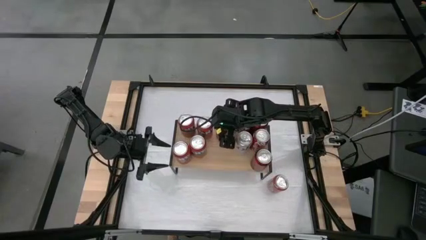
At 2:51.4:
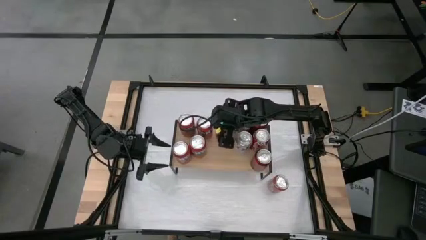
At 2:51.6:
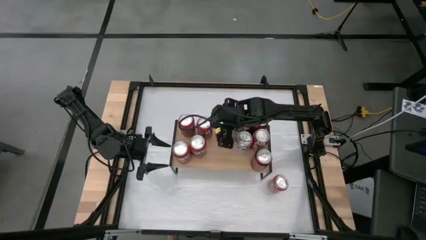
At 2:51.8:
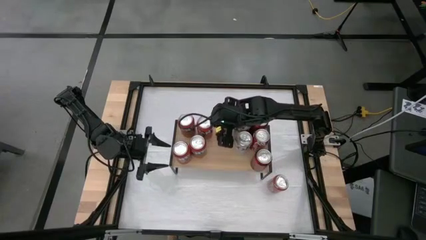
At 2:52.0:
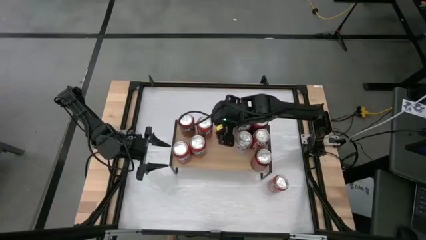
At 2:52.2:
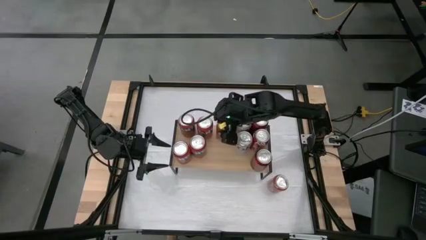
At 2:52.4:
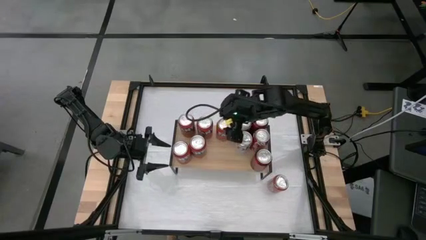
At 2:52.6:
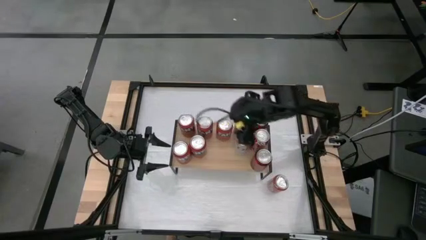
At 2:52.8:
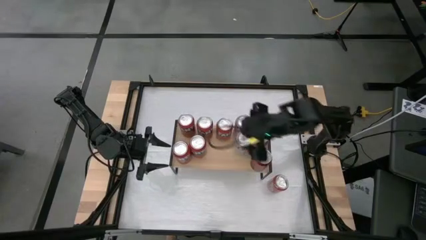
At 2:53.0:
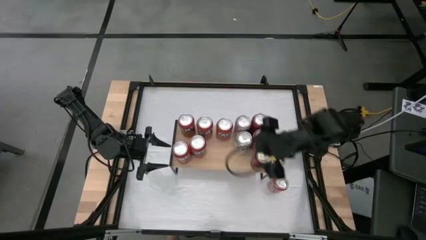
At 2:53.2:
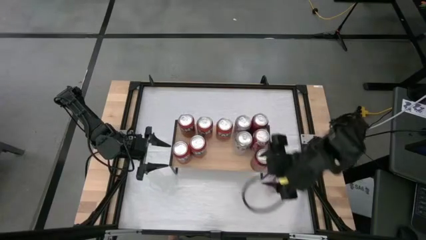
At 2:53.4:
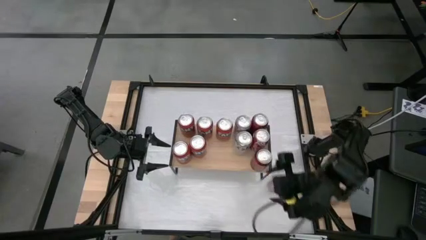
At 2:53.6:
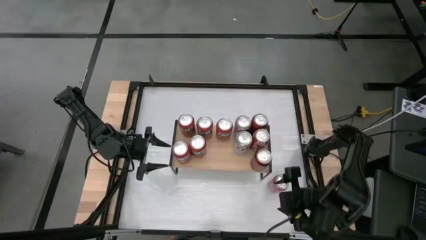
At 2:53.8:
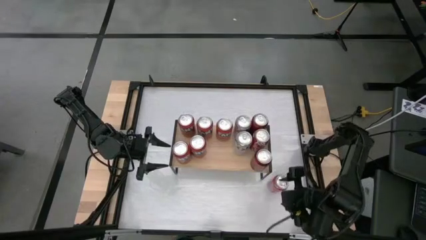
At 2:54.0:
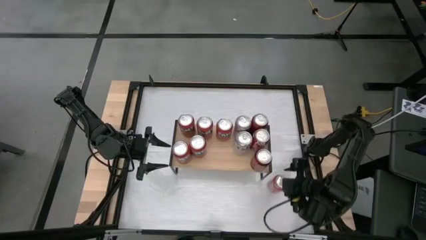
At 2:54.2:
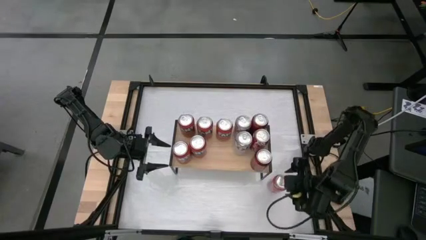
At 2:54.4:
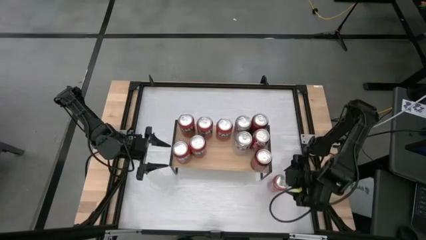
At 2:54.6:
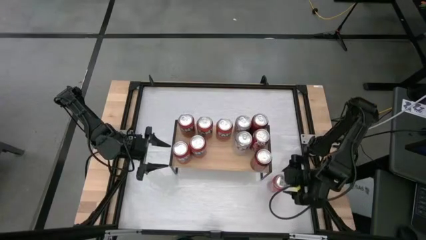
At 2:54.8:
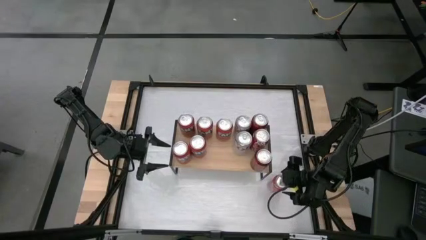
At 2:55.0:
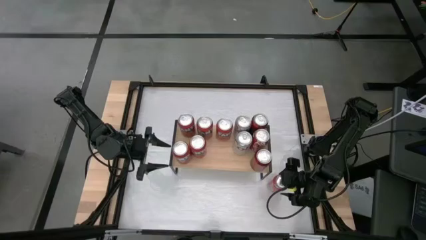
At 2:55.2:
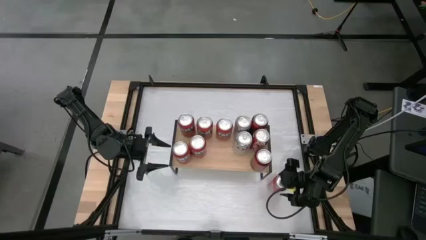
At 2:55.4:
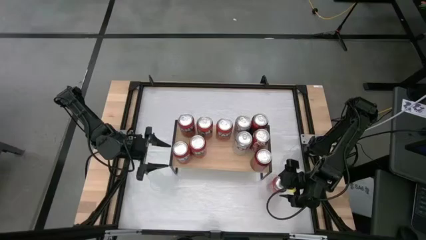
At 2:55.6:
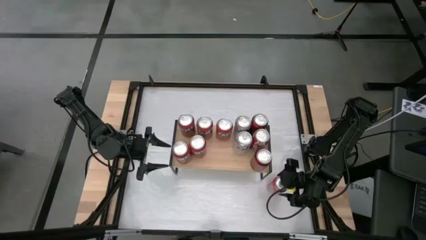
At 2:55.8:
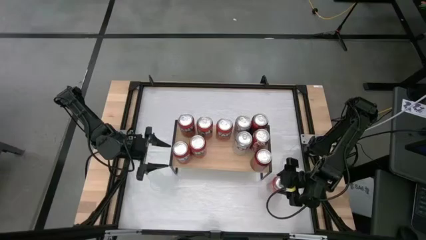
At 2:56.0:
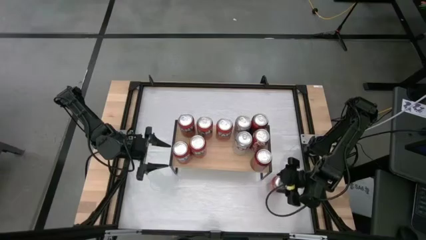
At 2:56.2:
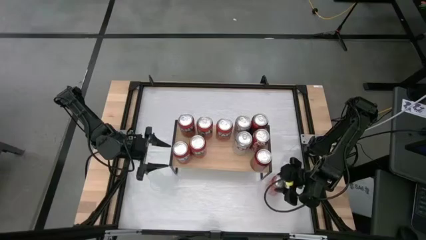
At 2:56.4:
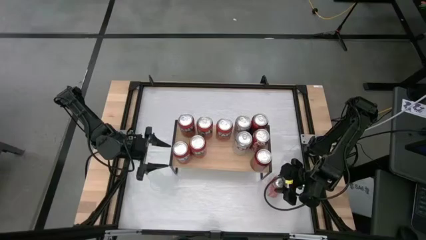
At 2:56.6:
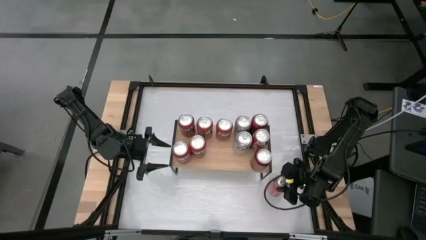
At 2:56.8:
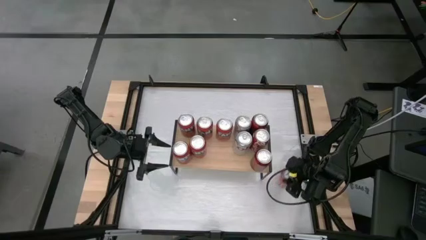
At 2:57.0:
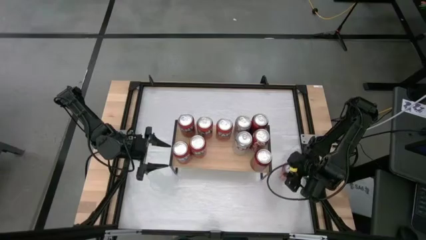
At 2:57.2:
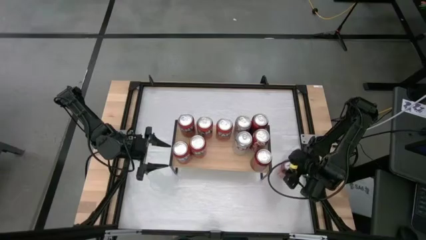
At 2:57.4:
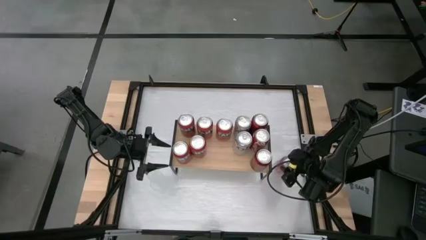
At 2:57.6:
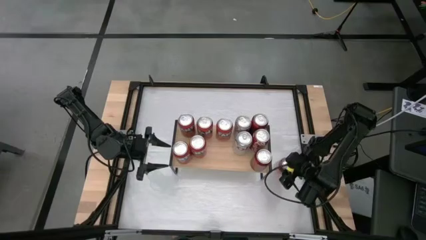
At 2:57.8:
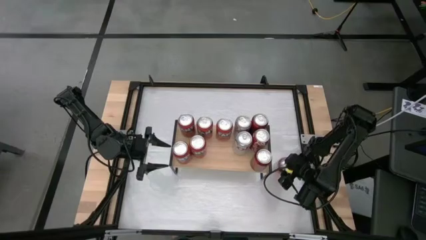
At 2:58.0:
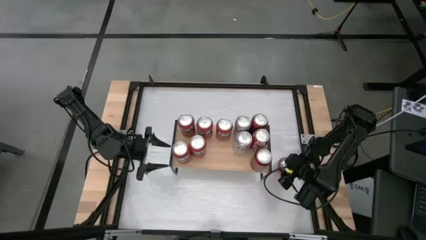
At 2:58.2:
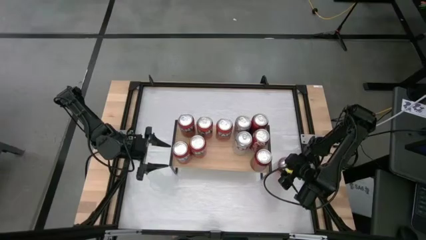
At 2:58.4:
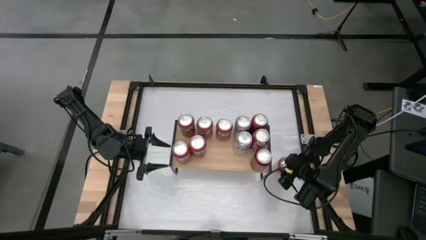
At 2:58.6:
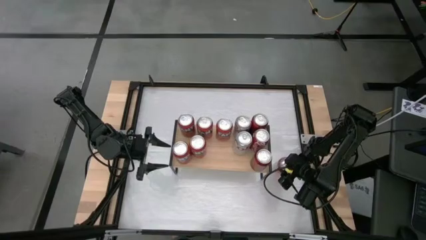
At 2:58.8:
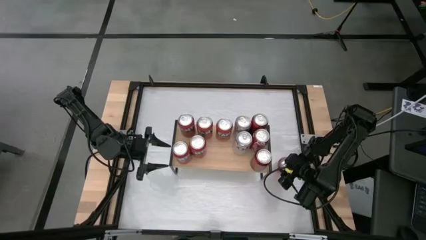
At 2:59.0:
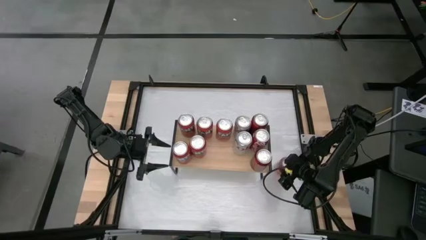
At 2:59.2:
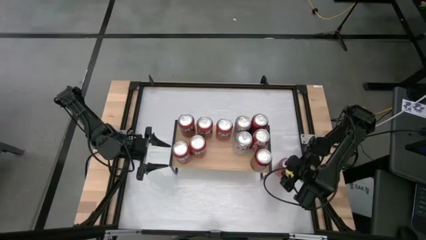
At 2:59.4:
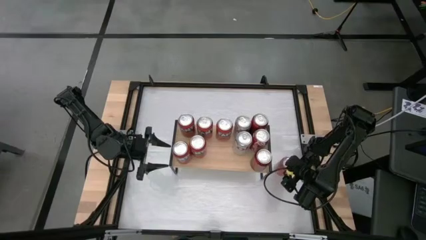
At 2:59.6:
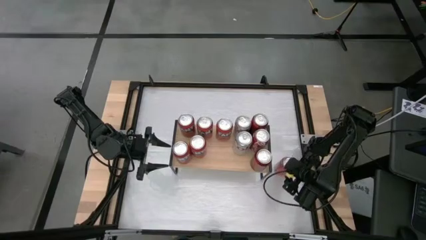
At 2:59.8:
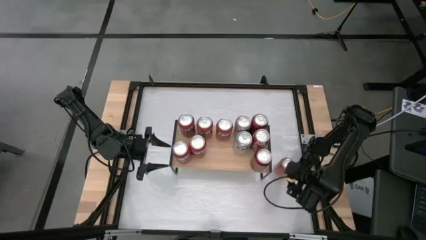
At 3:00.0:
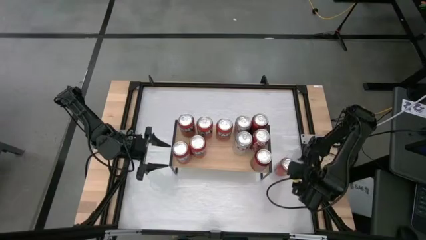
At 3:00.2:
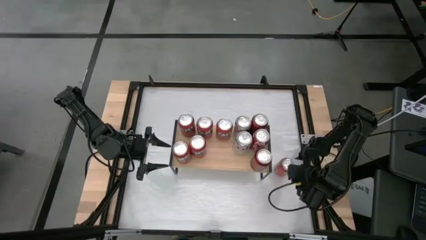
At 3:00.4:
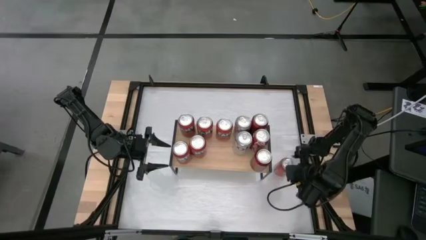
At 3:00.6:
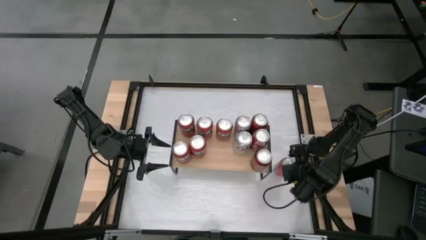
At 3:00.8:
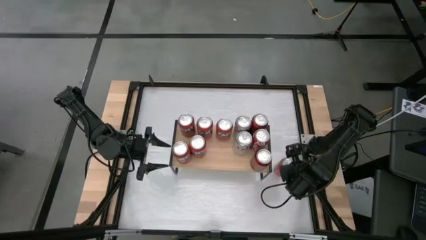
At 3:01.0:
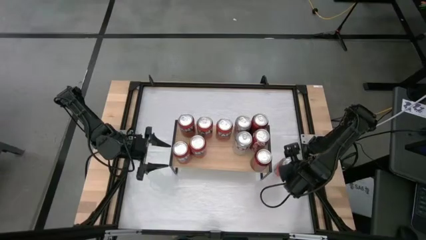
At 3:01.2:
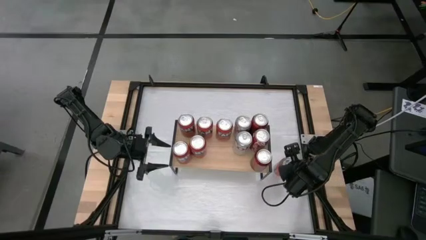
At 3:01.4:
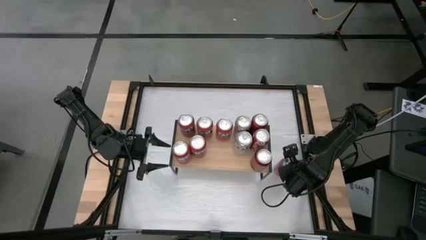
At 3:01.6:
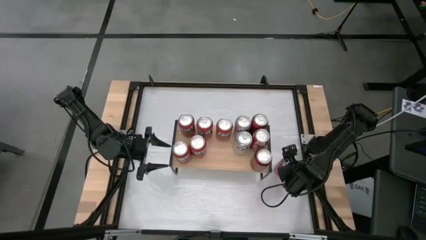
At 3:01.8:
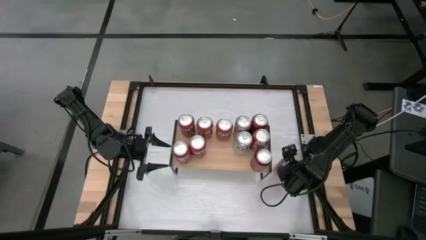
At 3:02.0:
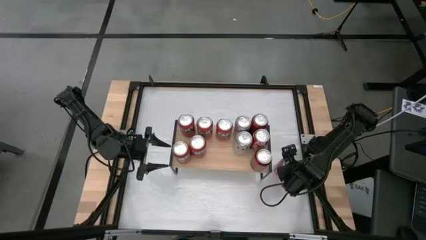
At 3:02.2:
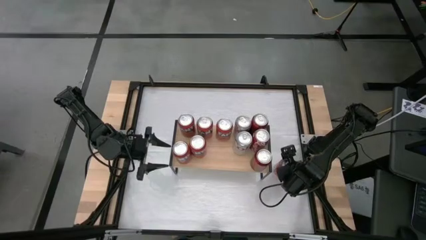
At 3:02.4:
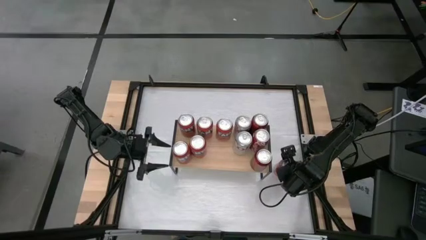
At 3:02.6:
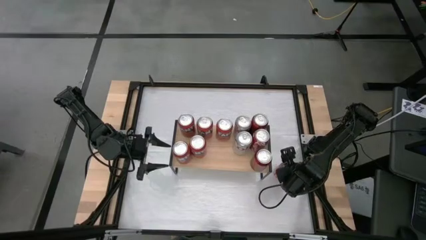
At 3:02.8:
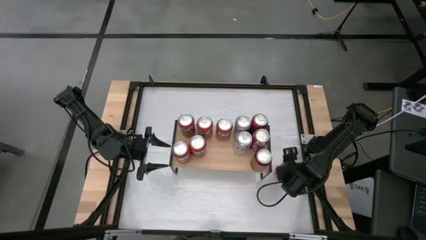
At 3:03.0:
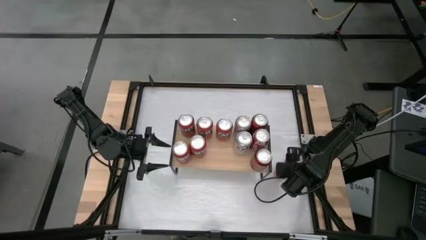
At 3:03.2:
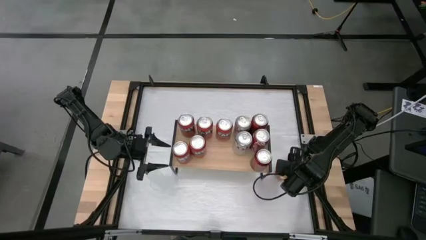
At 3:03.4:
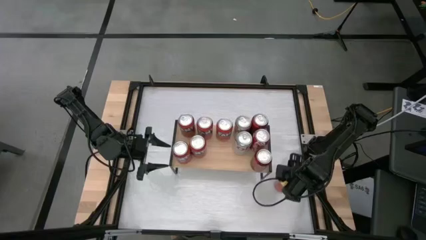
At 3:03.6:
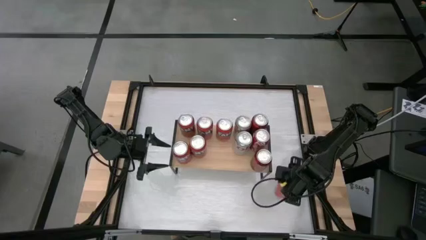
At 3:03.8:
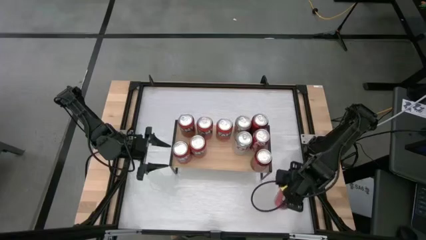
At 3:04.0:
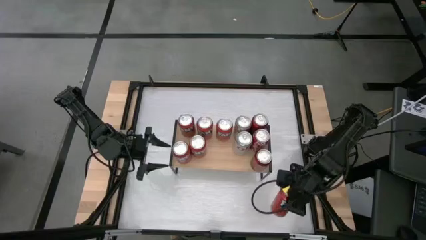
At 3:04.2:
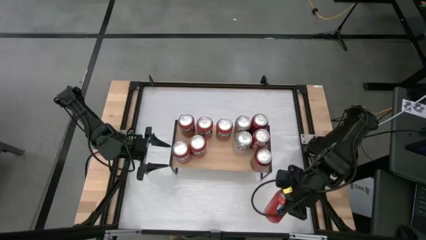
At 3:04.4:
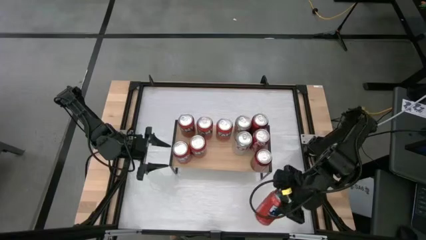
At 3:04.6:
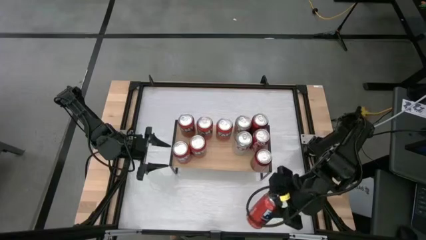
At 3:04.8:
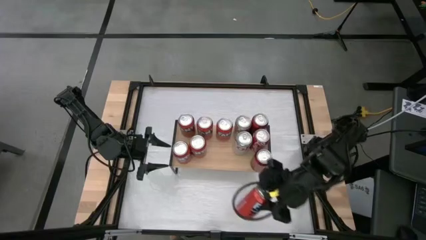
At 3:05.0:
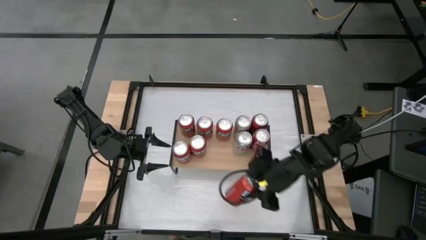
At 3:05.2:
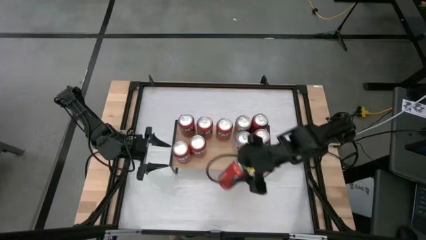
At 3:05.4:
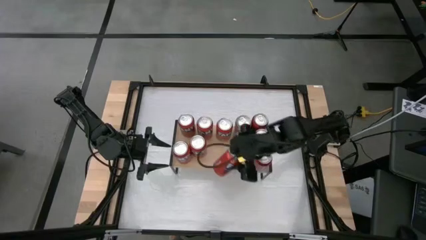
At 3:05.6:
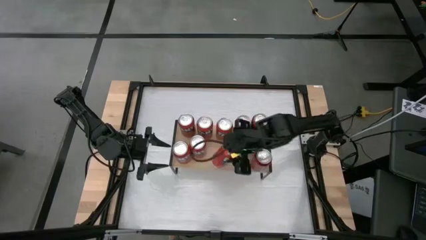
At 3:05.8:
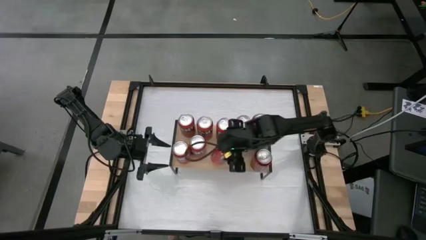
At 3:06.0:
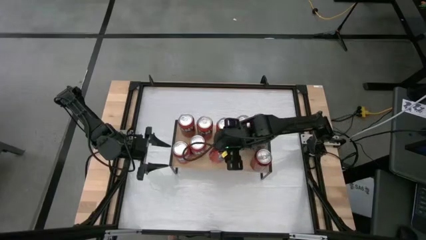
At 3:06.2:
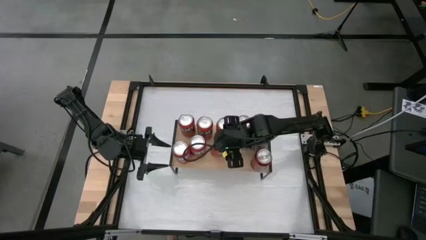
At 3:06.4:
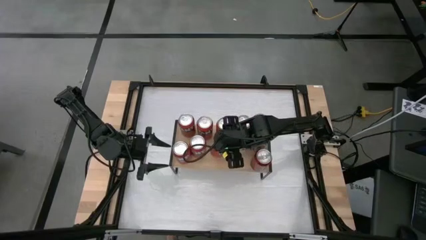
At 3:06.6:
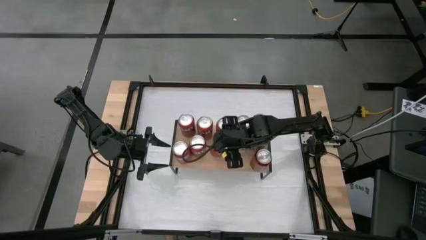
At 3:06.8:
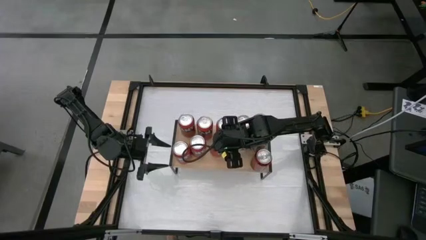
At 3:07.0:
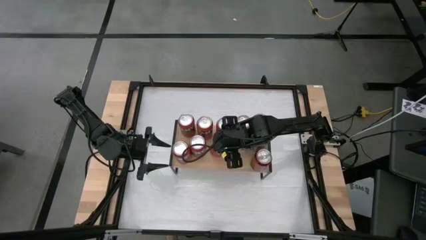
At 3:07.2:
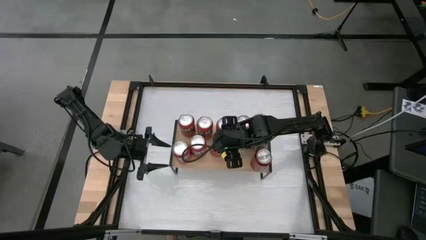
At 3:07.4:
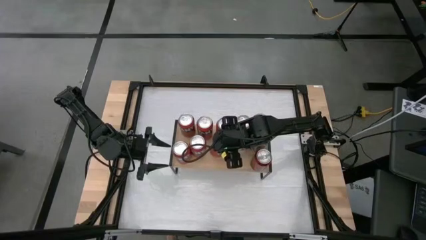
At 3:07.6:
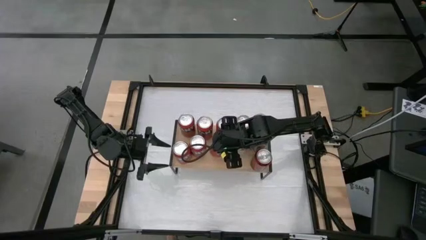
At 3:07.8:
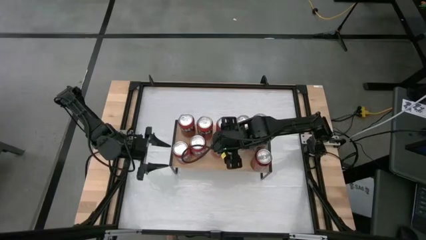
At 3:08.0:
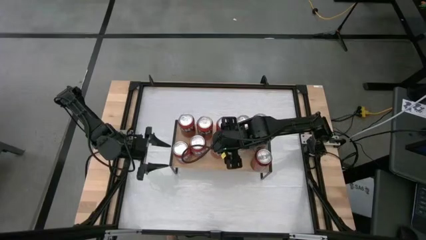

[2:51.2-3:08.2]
Task: Place canned beverage on shelf
Put the red soda can on the shelf
